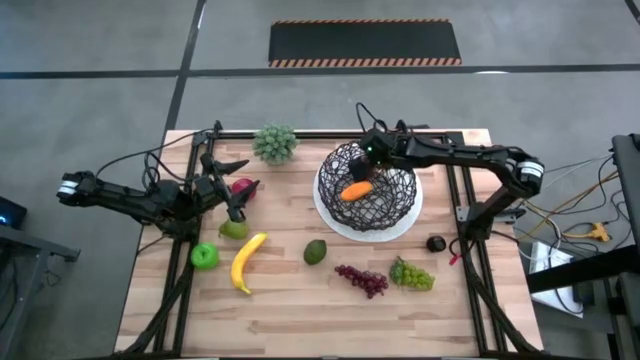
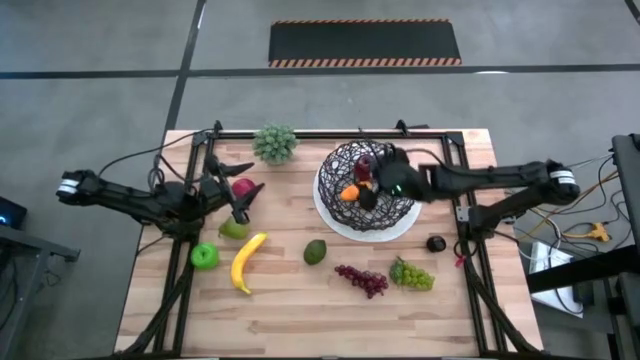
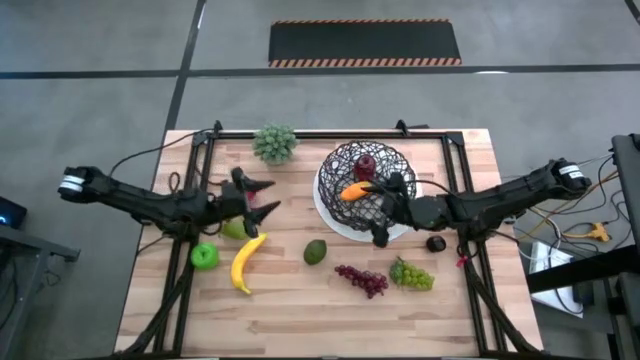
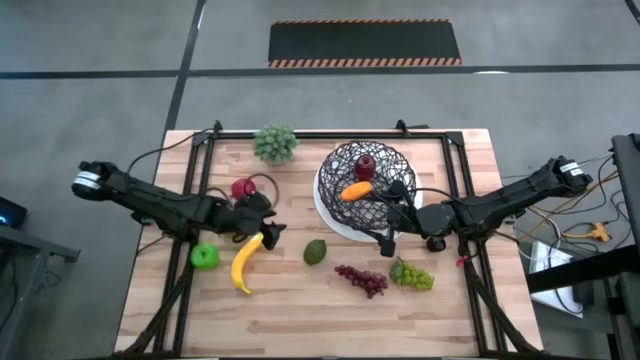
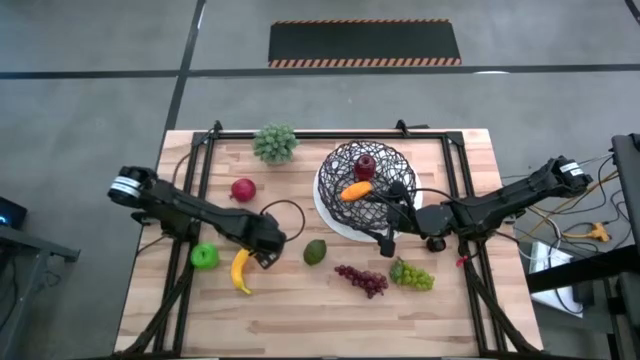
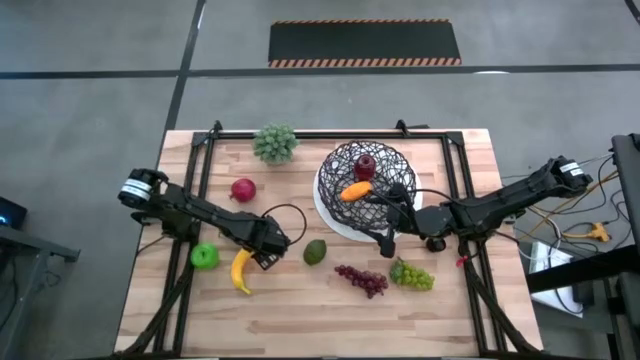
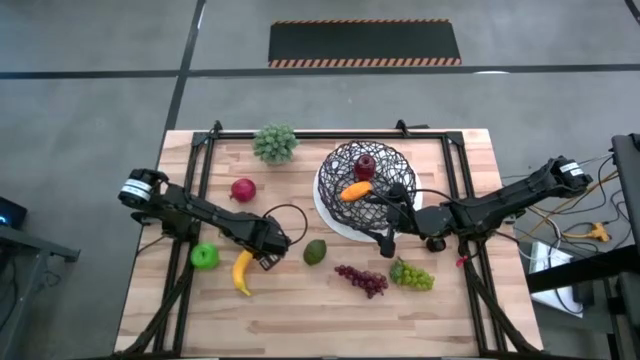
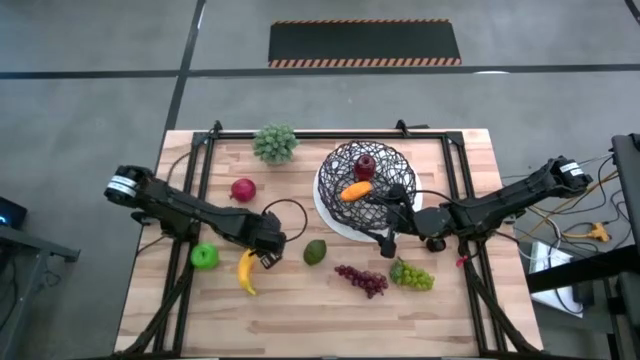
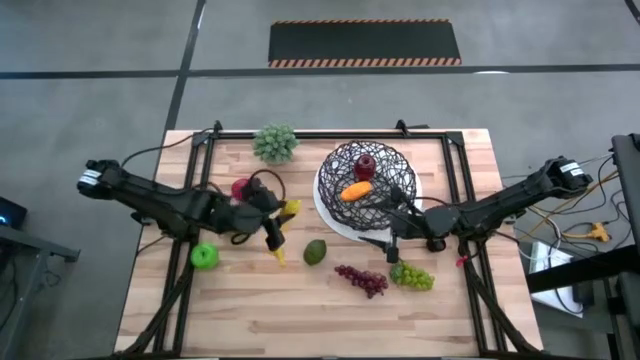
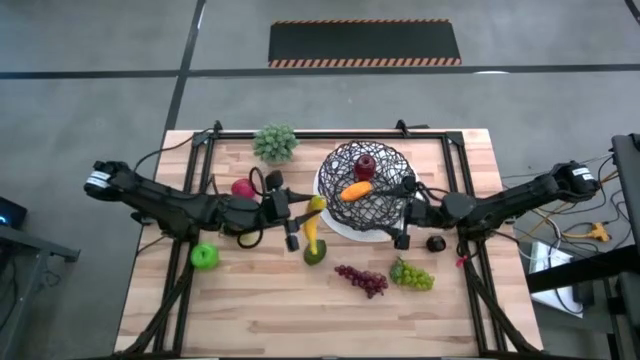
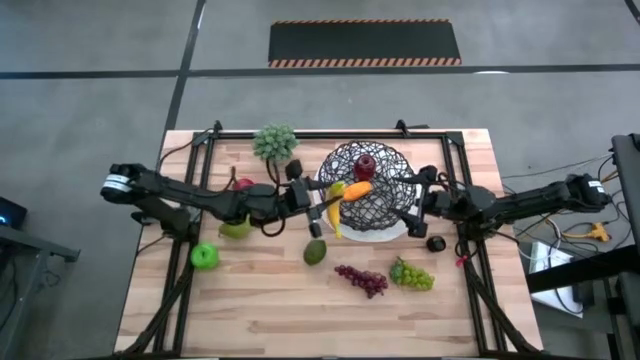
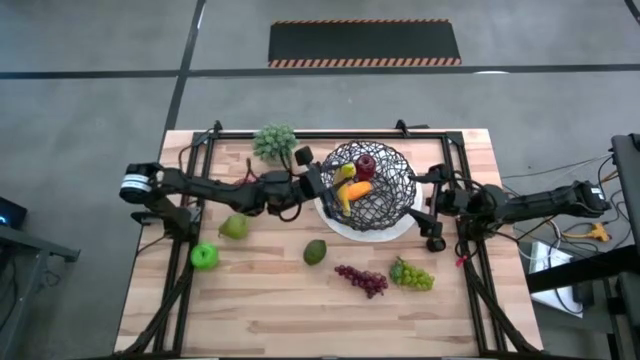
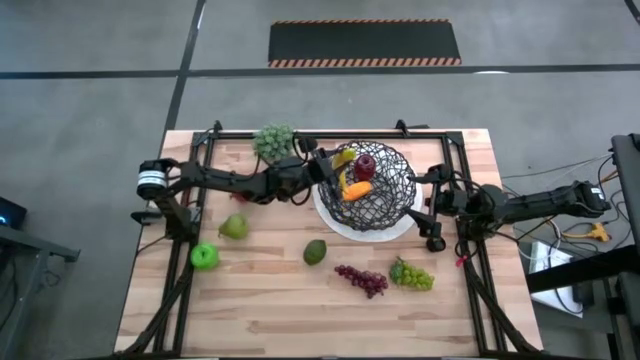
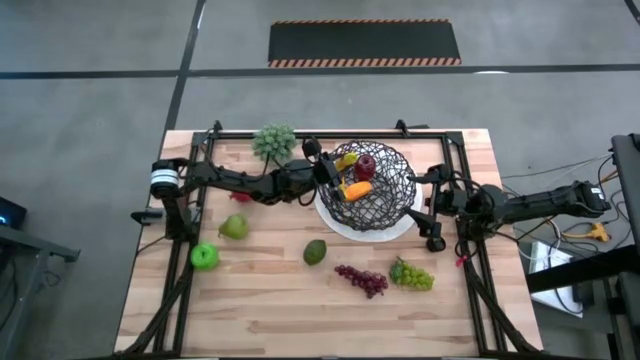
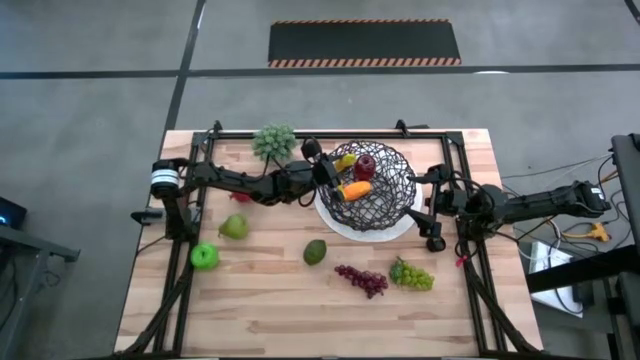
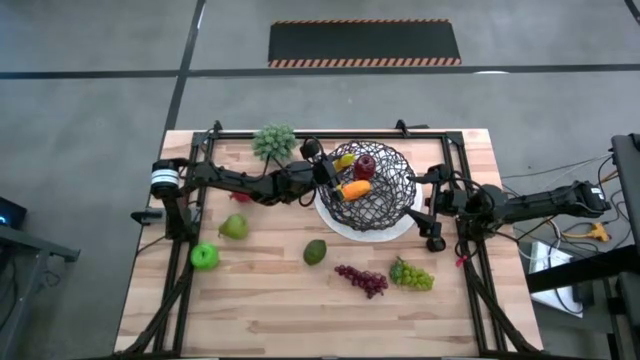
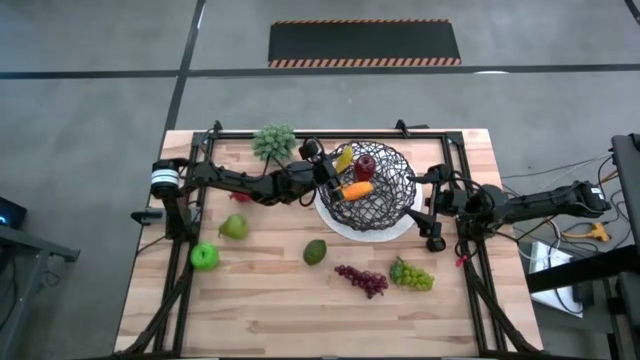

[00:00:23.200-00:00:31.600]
Task: Build produce basket
Put the yellow banana into the black wire basket

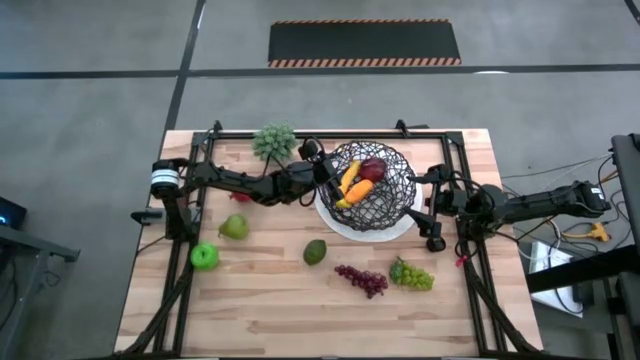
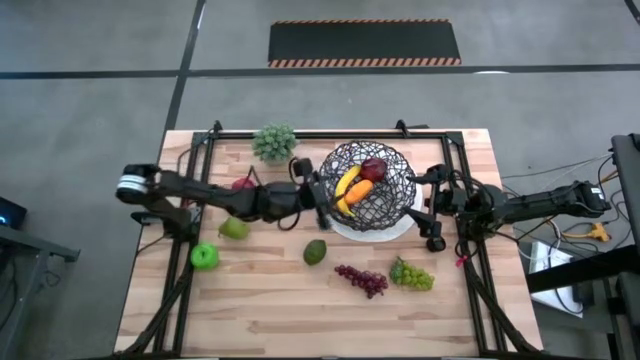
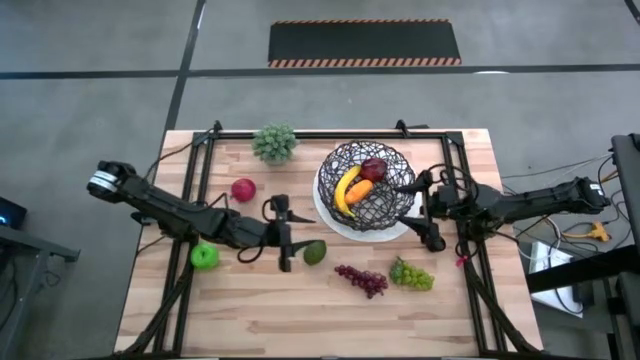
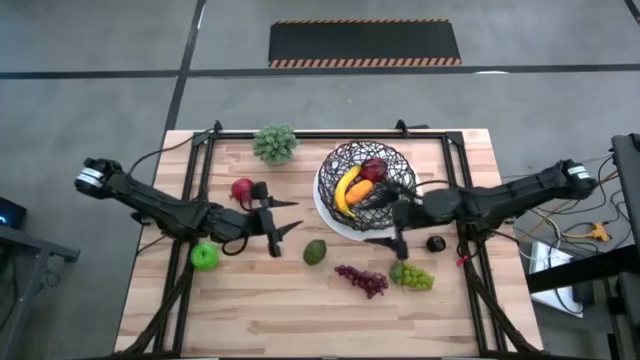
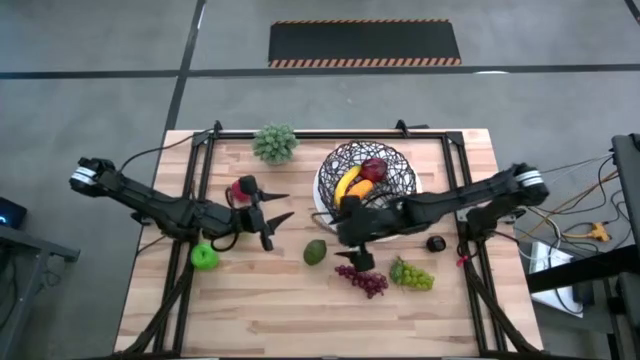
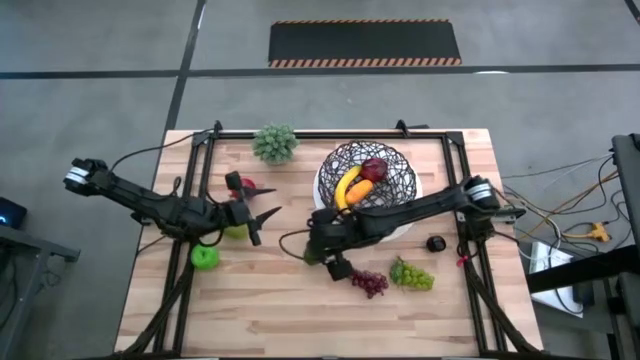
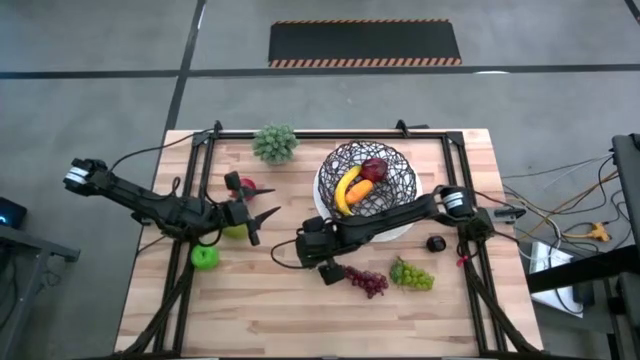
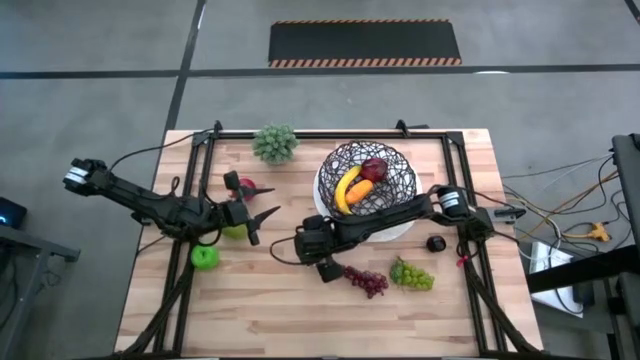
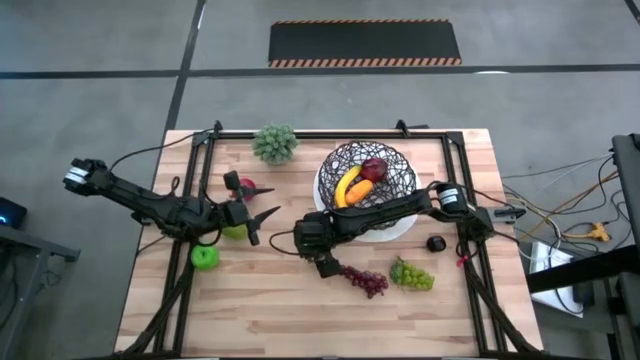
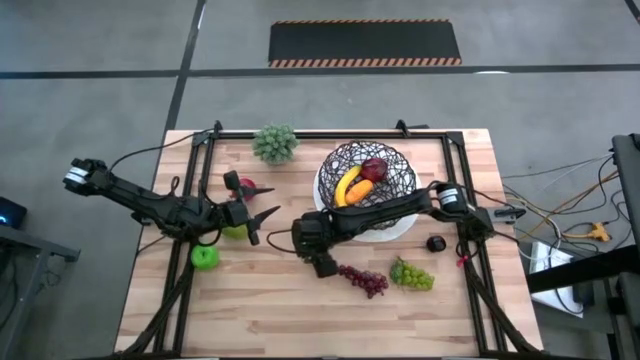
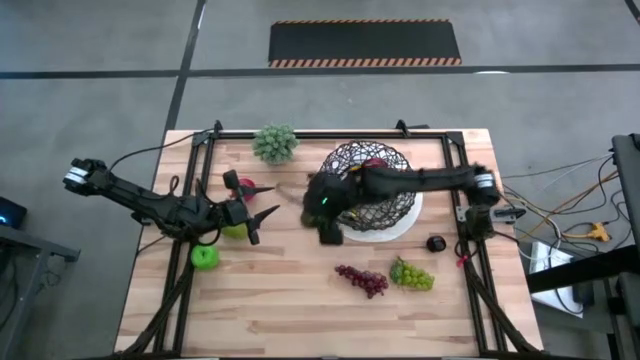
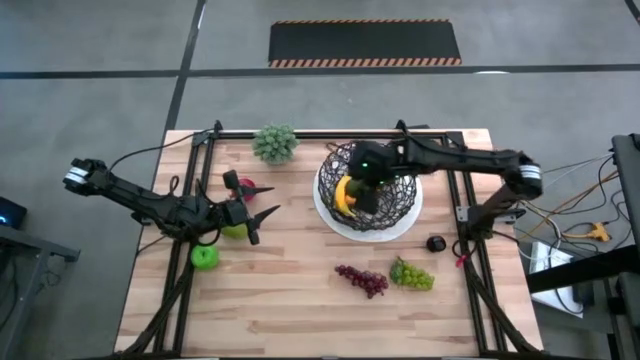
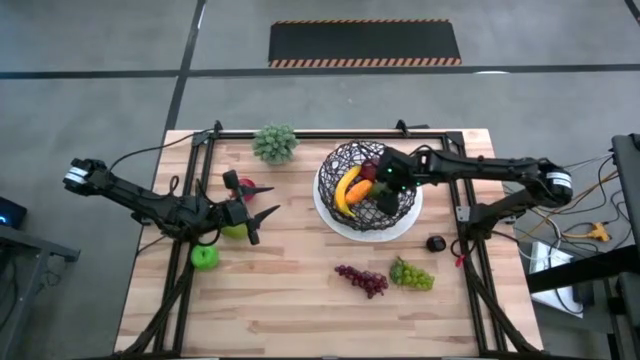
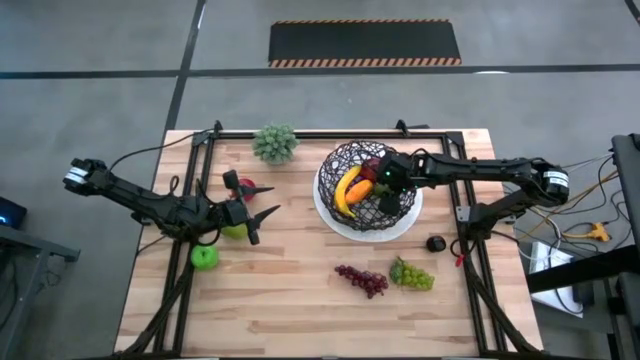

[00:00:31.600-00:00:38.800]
Put the green lime into the black wire basket

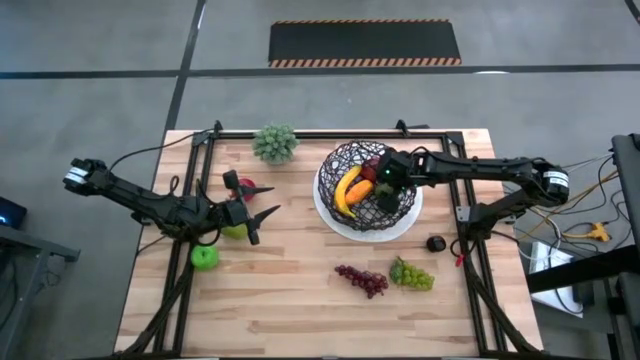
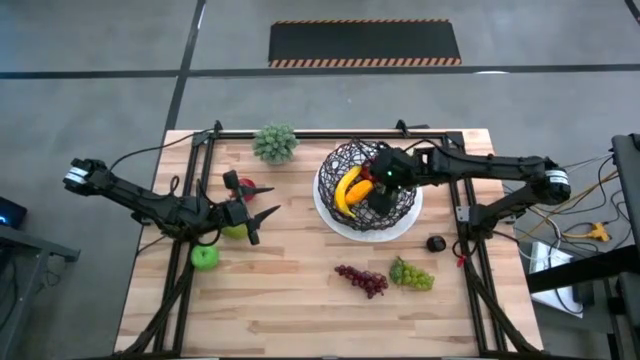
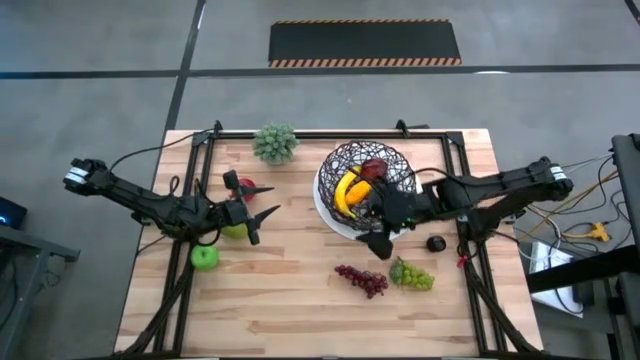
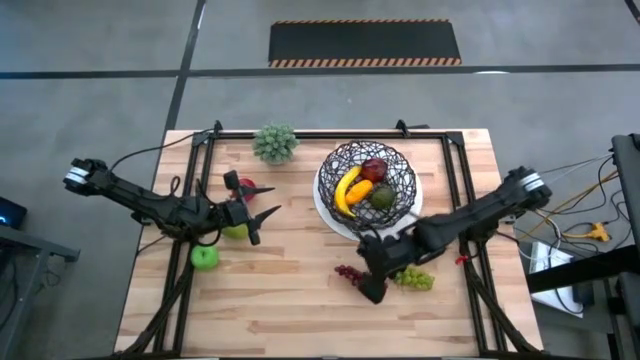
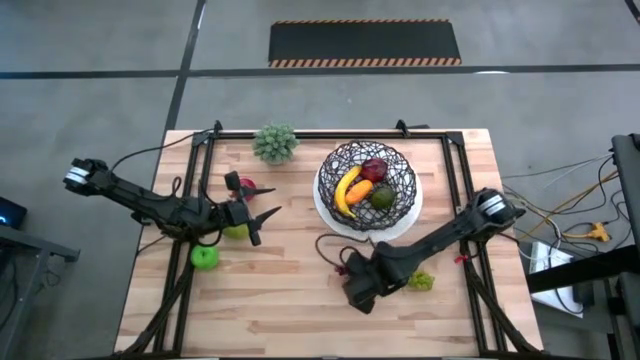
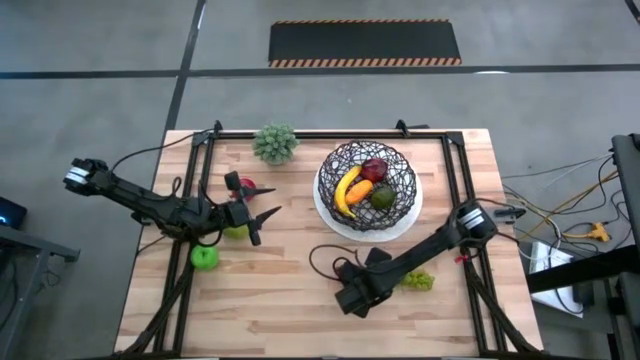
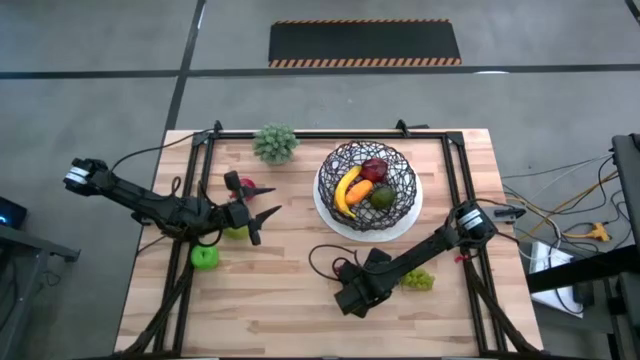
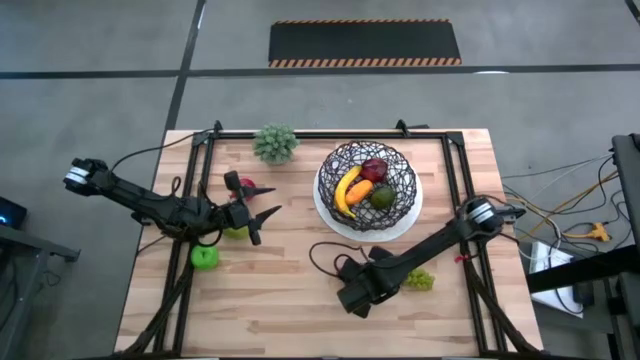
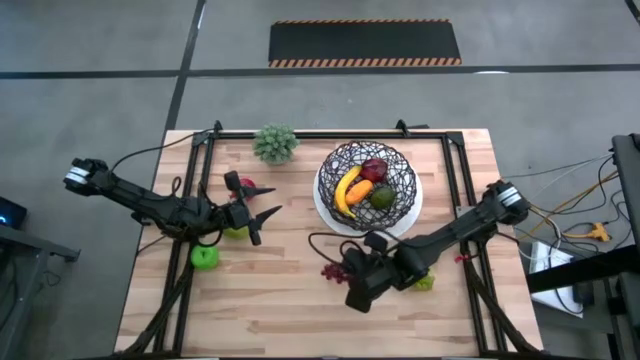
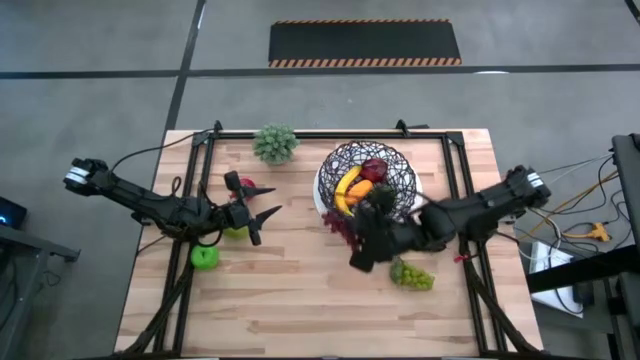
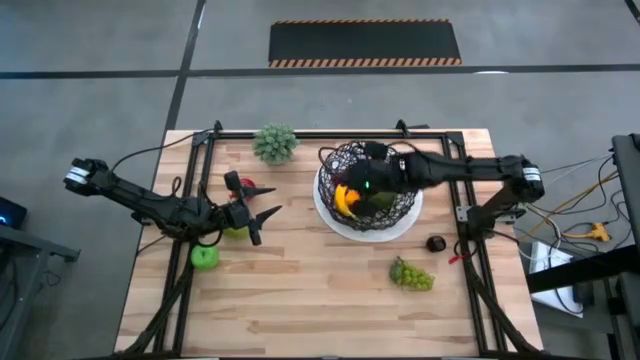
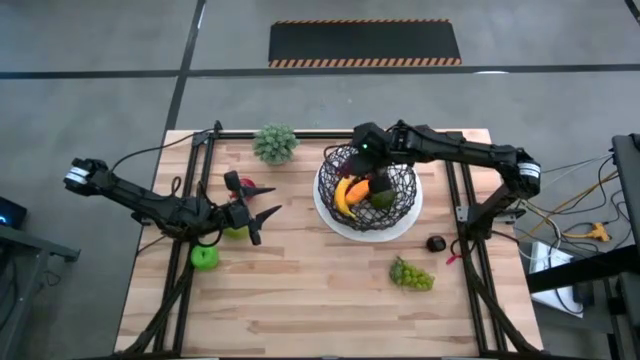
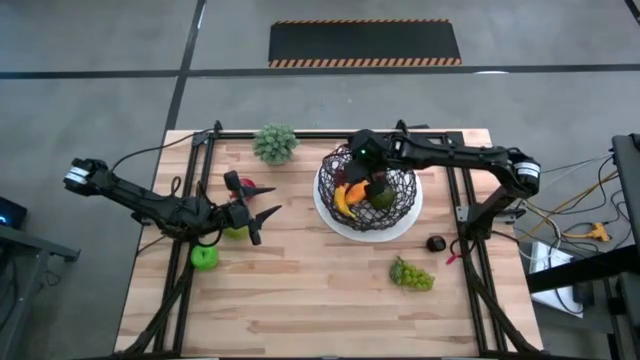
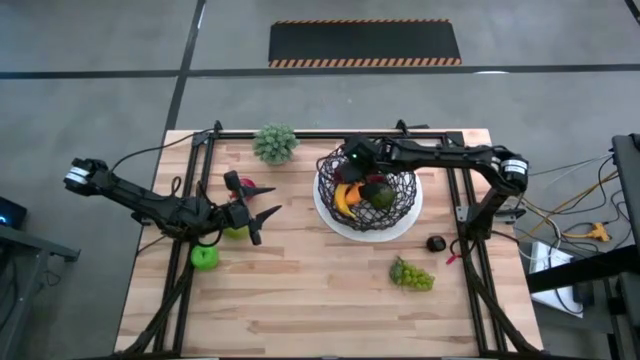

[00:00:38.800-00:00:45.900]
Put the red grapes into the black wire basket
